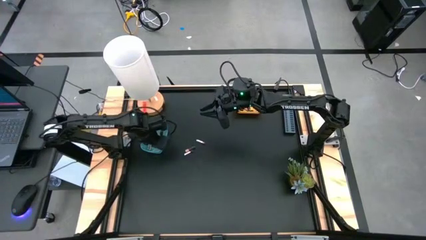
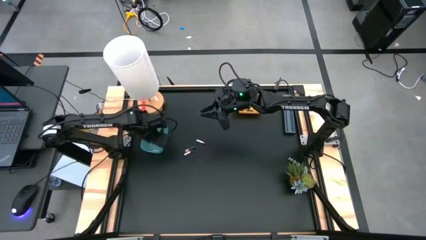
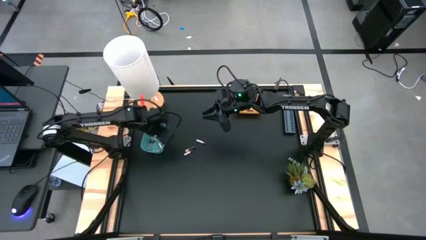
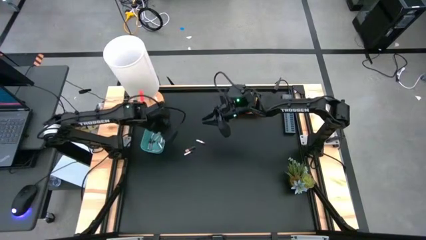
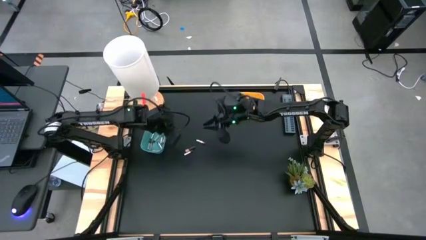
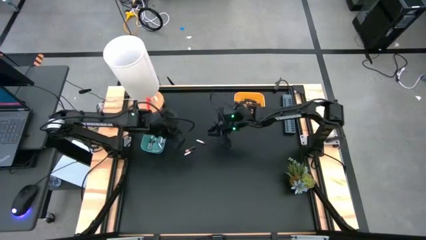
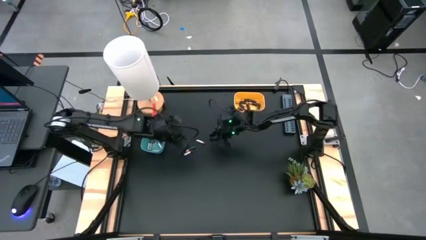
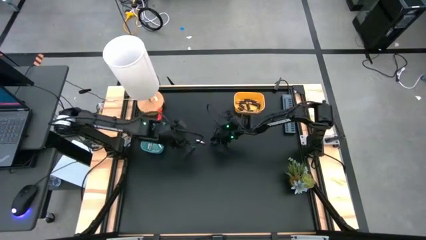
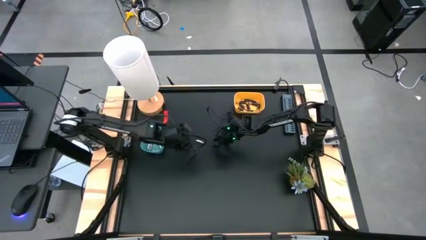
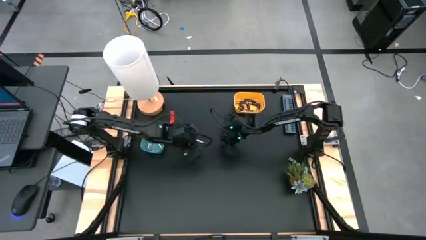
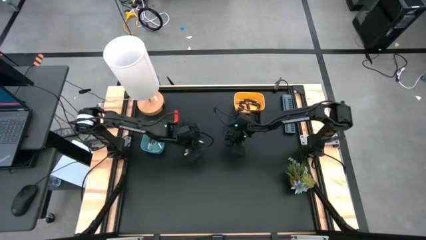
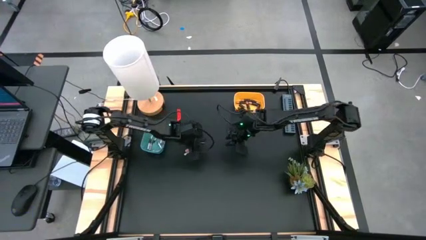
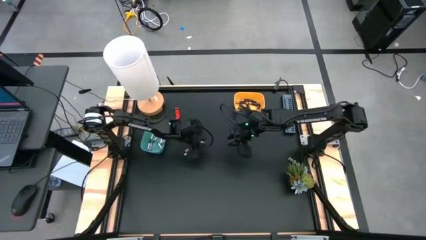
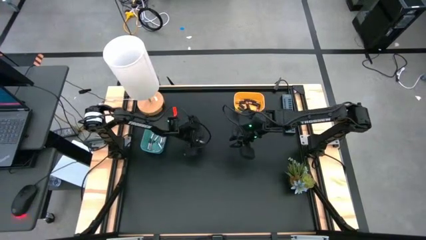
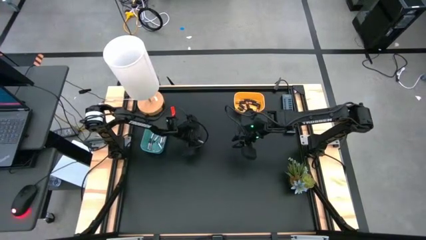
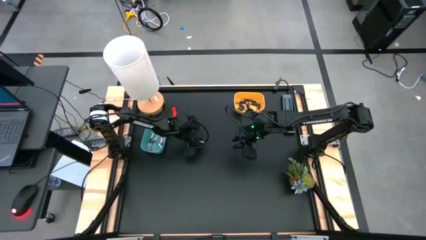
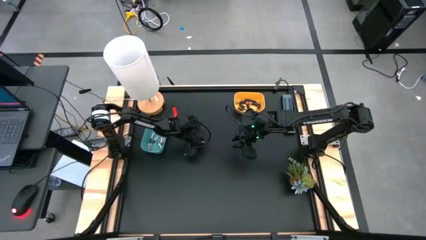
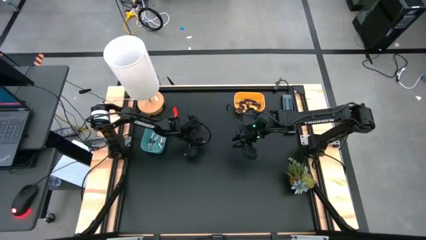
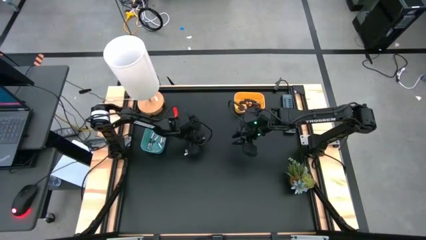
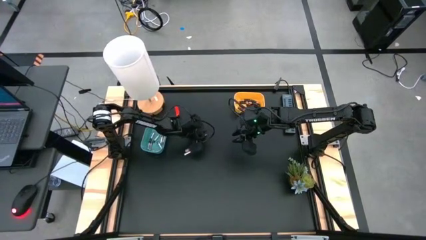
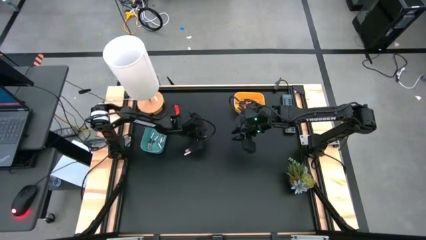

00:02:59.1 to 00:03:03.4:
Task: Sort batteries
Put the silver battery into the green bin

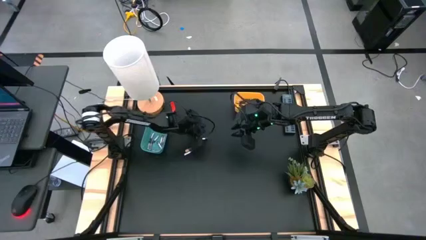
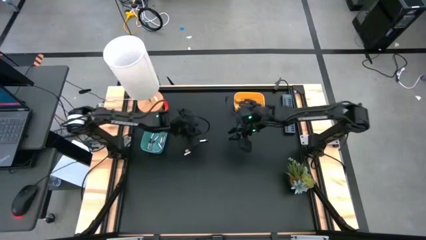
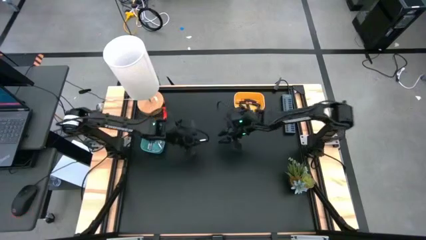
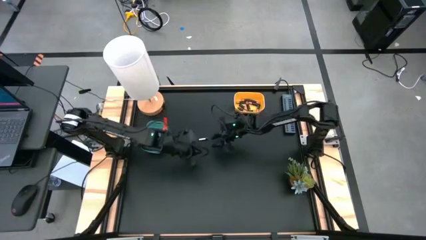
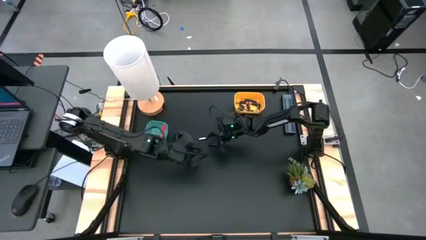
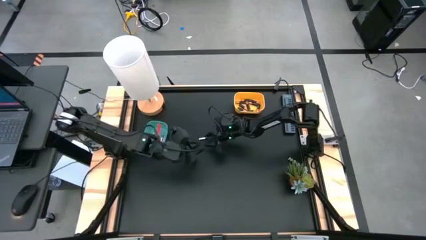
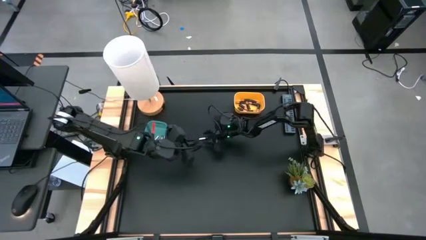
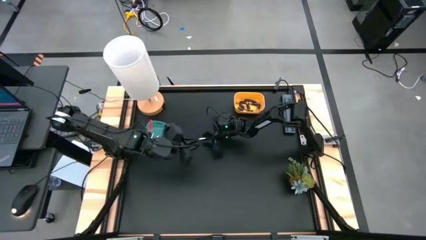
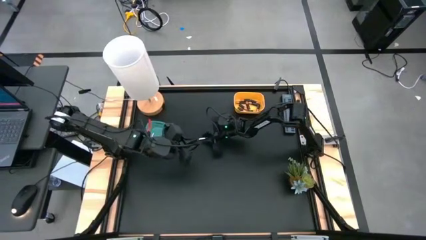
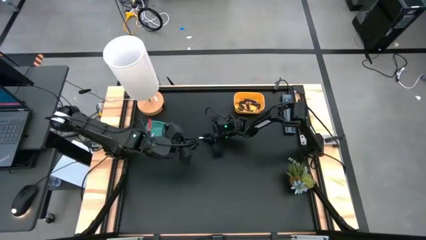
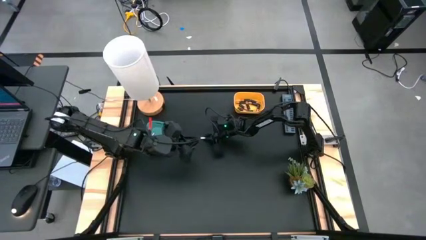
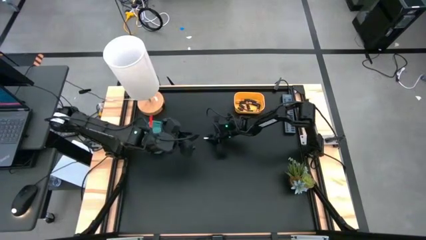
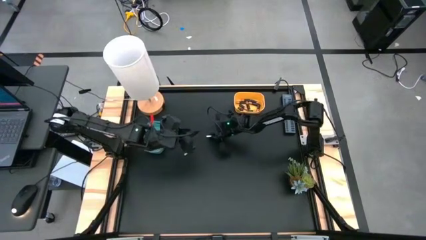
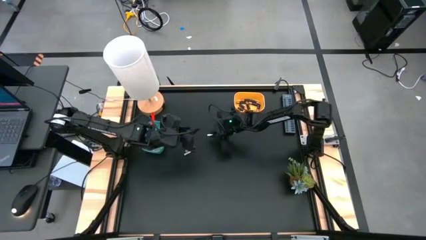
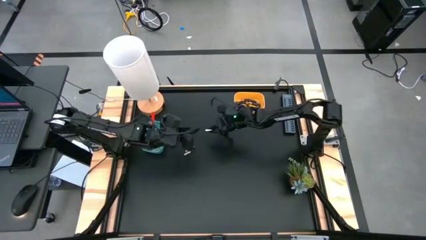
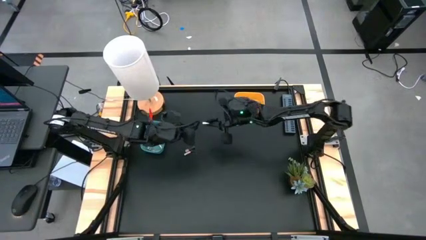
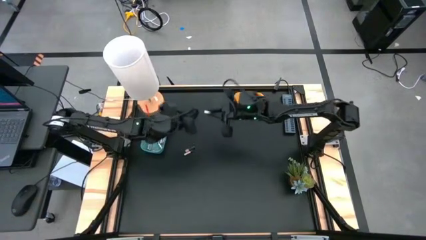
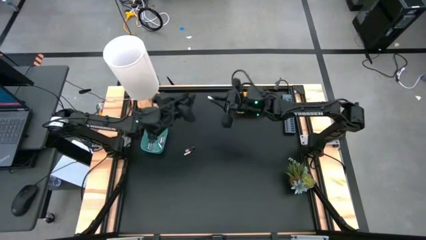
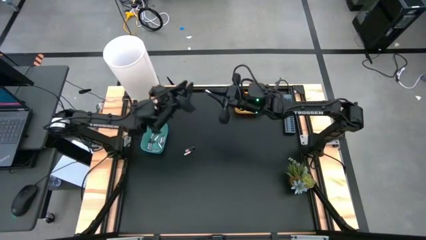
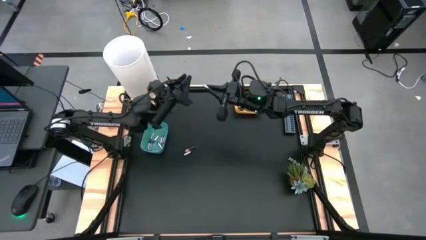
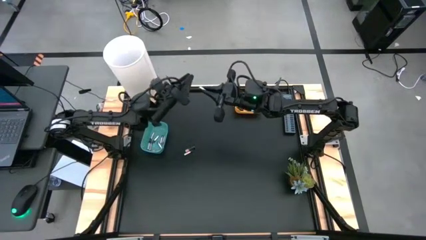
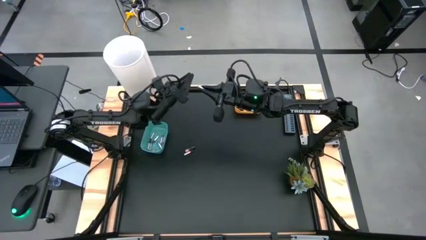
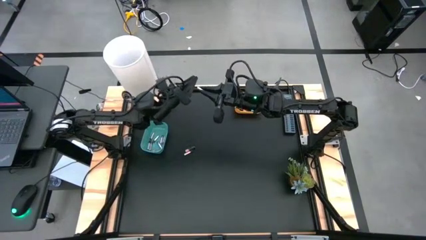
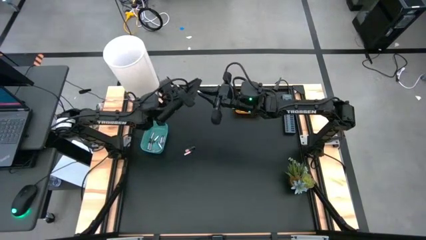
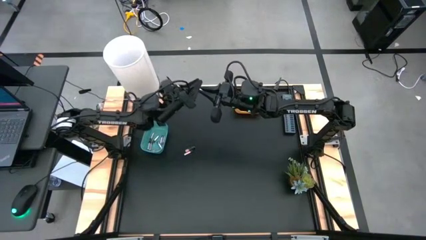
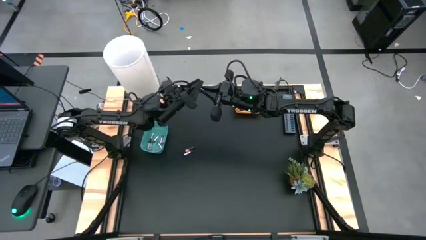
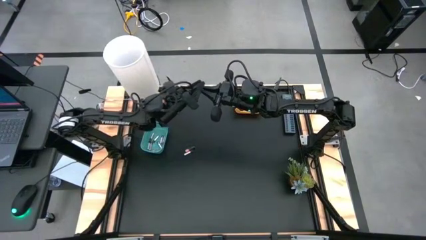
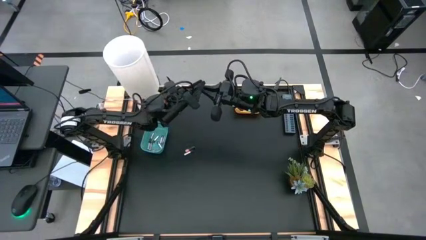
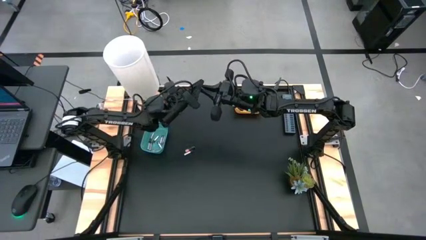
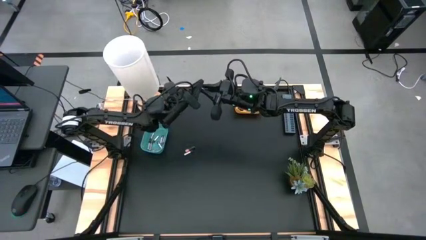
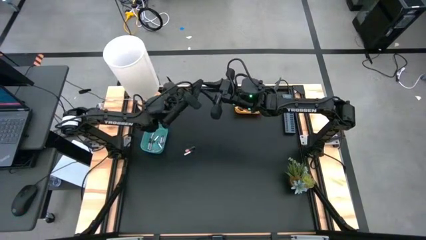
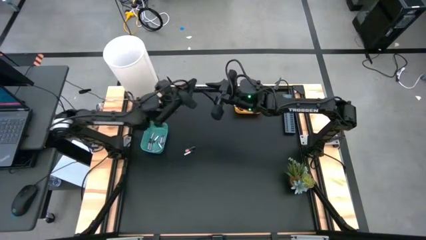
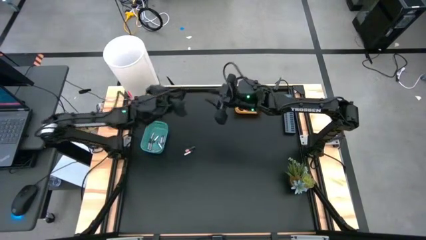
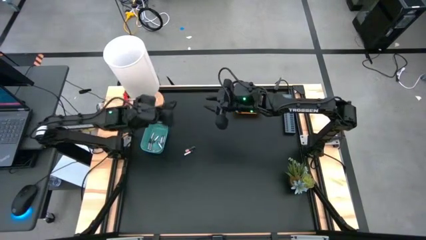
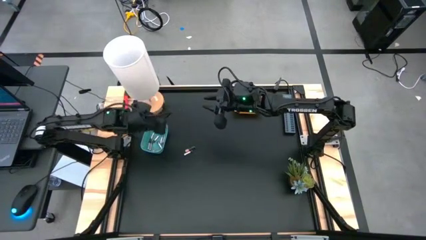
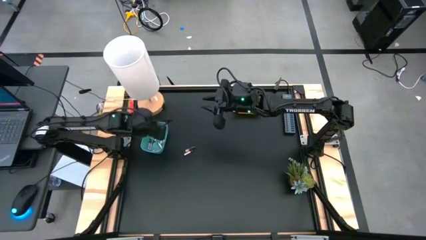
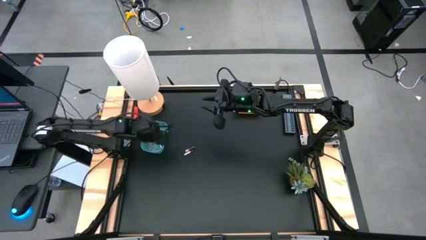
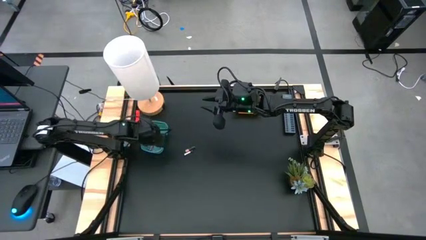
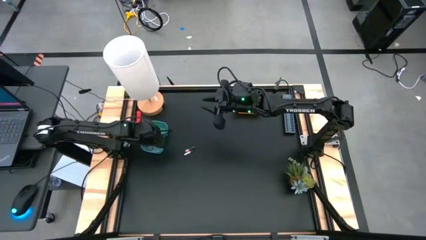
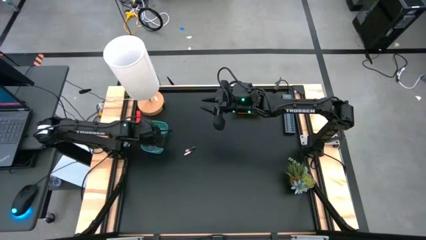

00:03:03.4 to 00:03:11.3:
Put the silver battery into the green bin

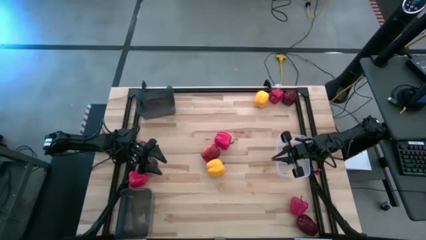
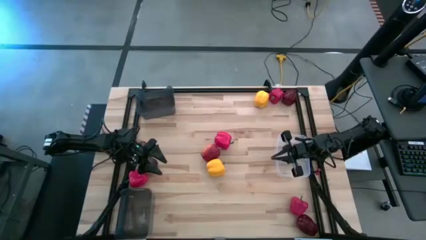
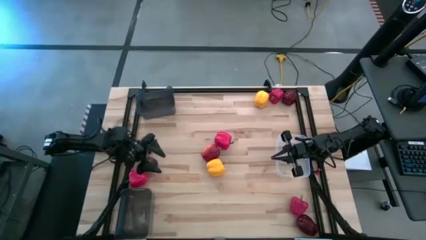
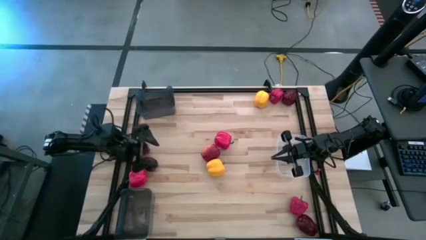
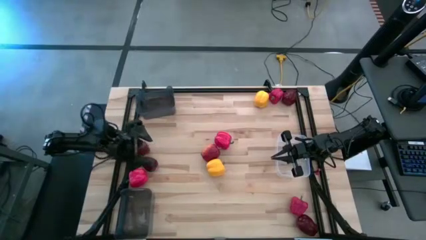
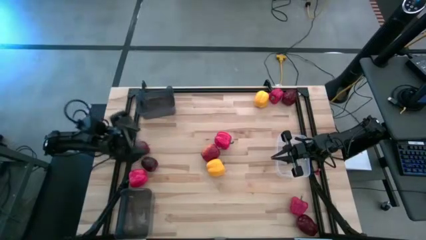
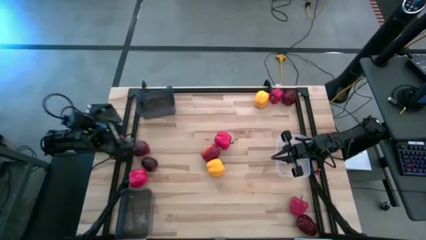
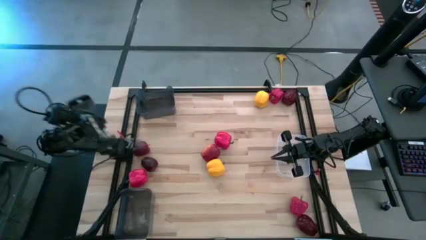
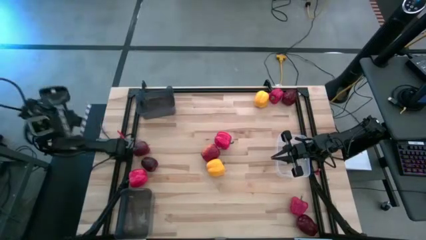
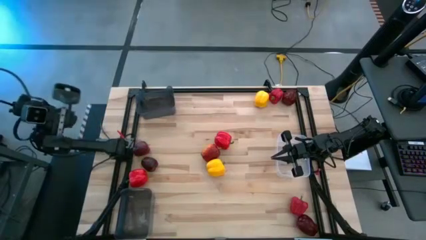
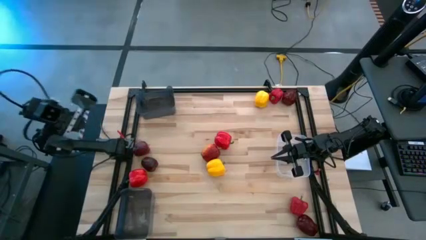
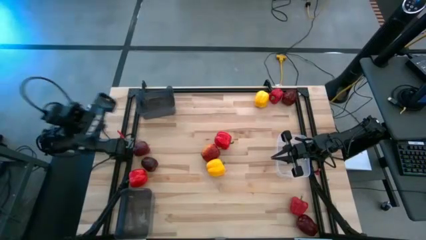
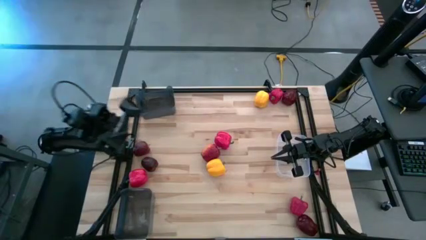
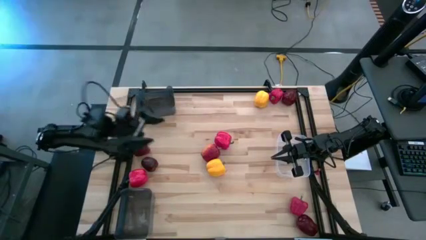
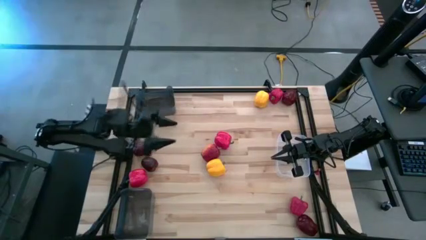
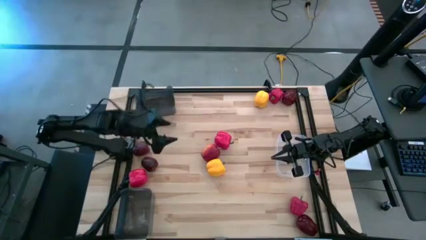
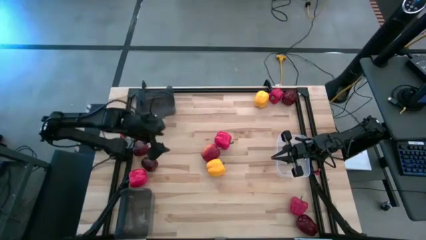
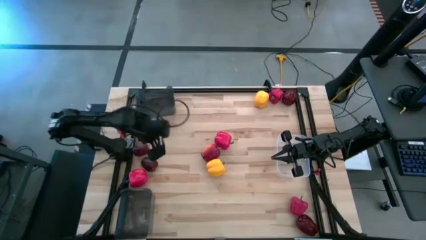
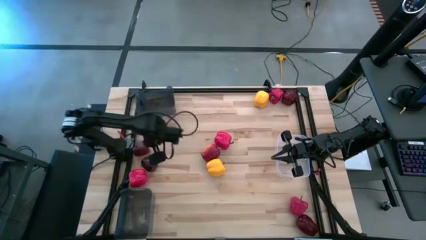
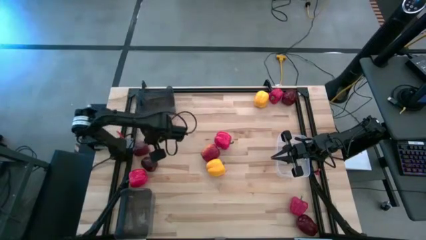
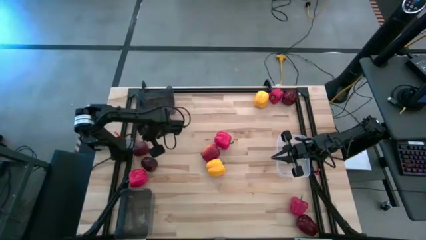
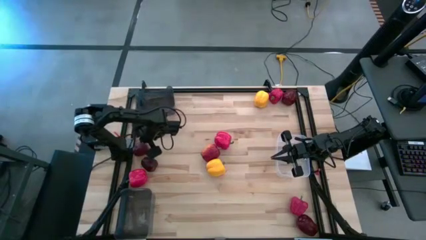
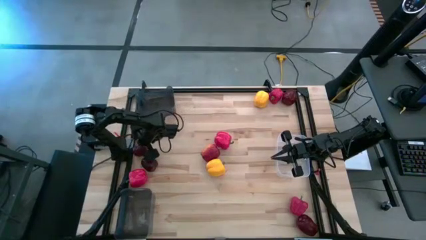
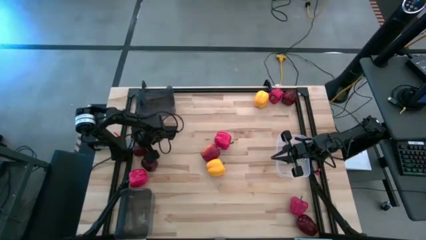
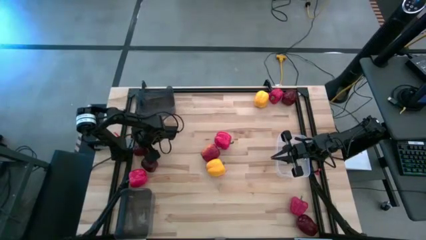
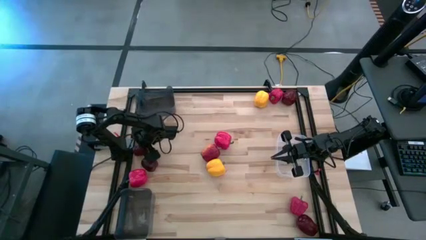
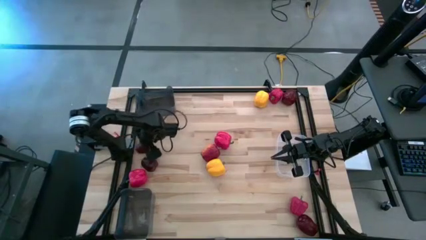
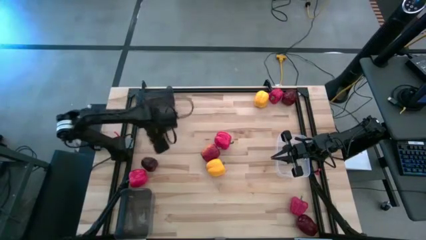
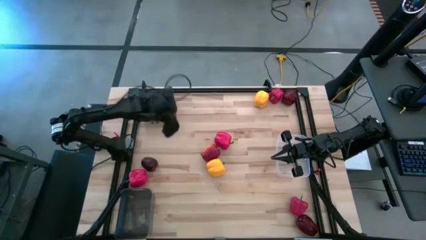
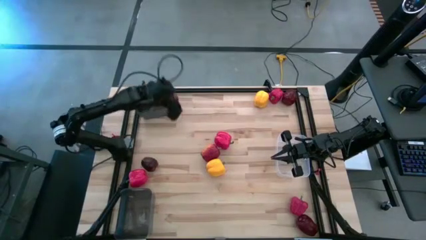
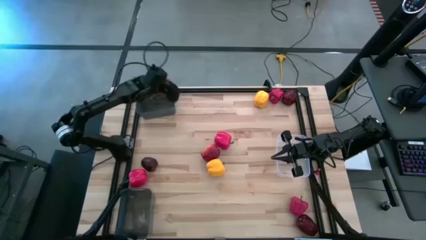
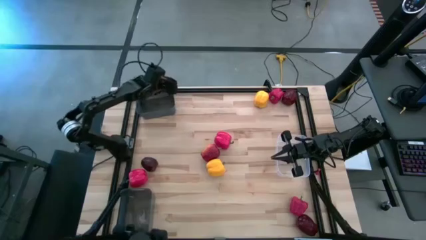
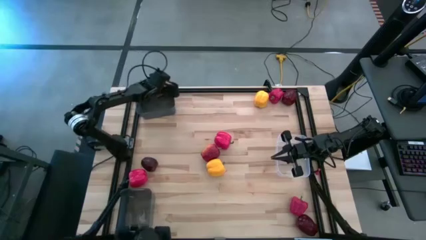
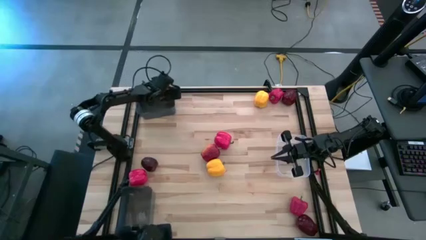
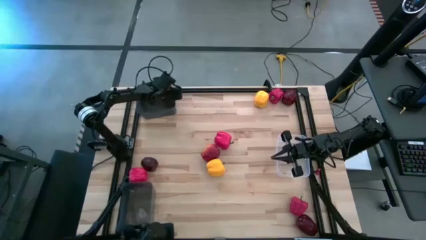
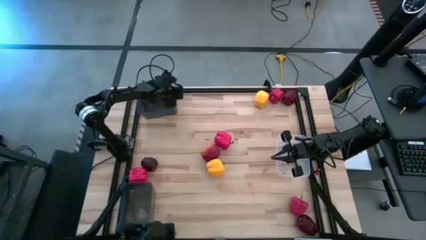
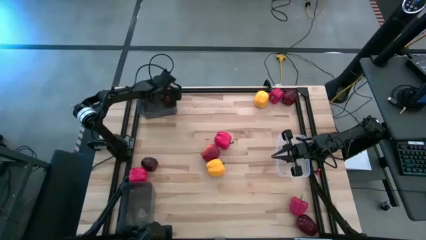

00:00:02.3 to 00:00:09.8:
Task: Sort produce into baskets
Put the apple into the top black bin
